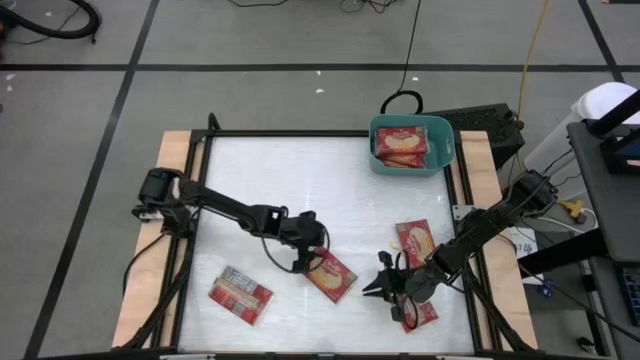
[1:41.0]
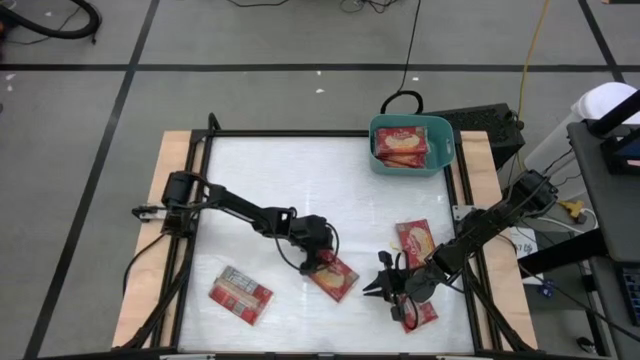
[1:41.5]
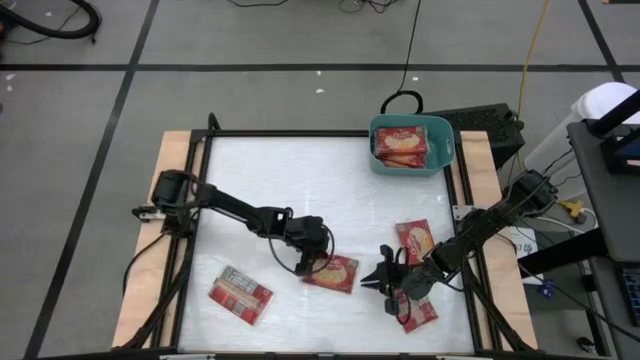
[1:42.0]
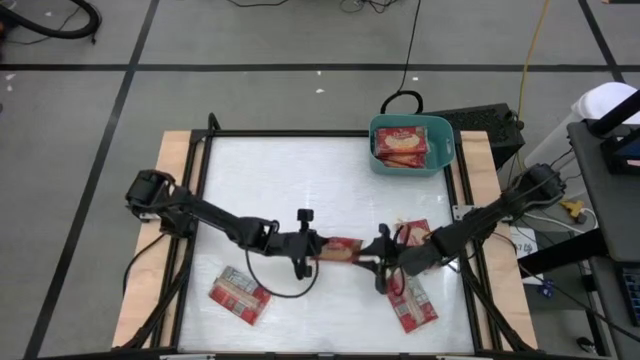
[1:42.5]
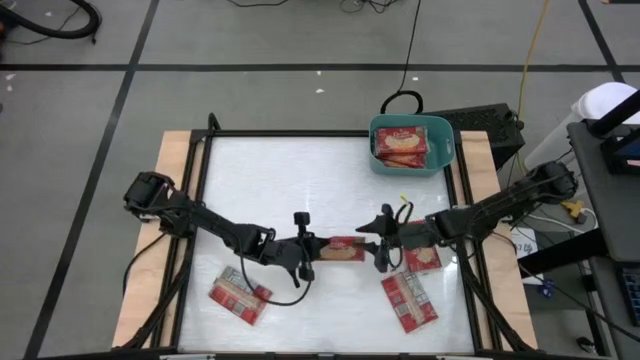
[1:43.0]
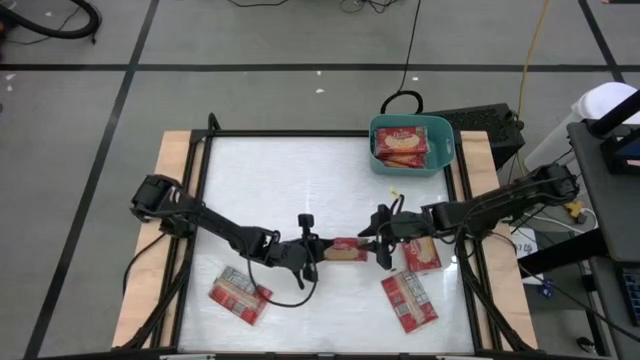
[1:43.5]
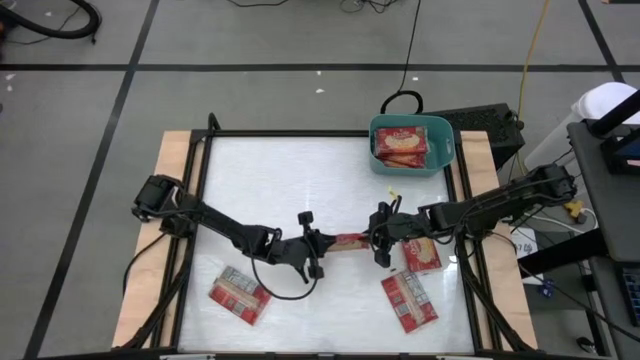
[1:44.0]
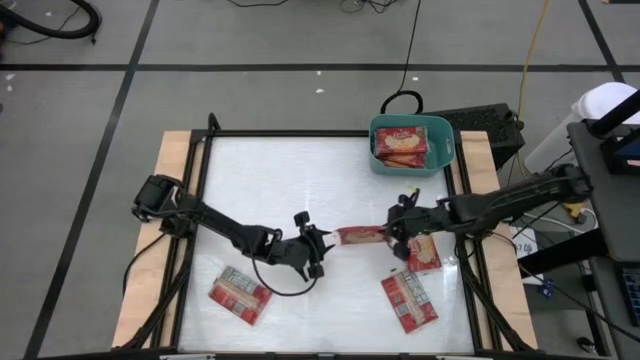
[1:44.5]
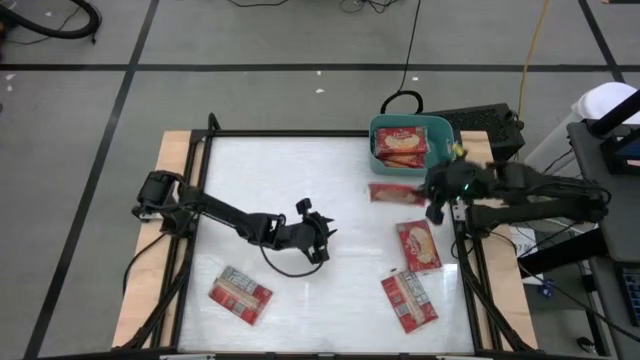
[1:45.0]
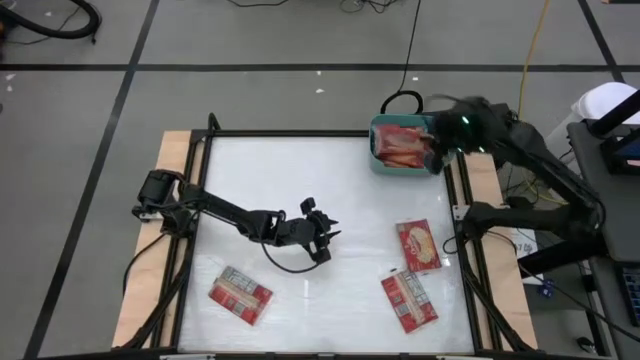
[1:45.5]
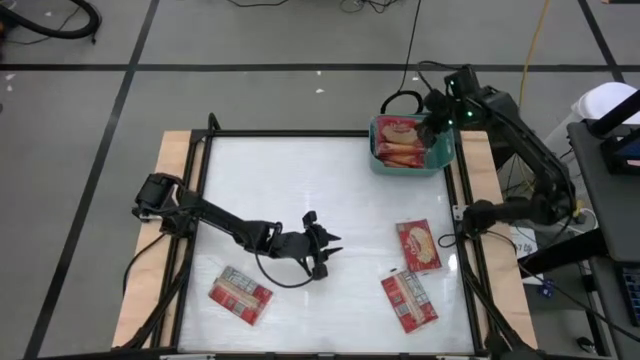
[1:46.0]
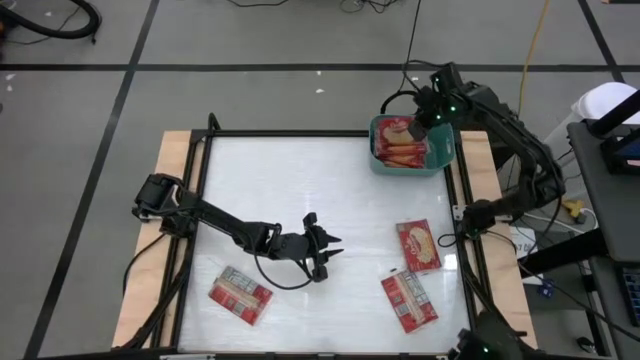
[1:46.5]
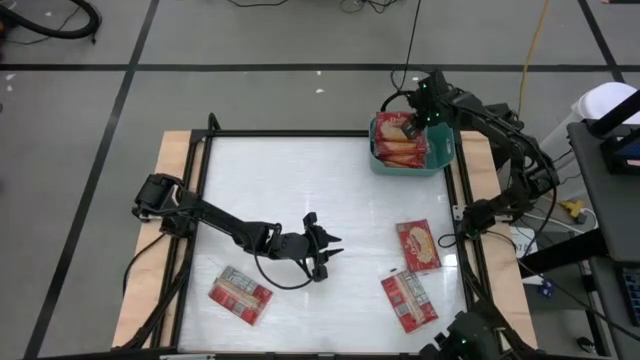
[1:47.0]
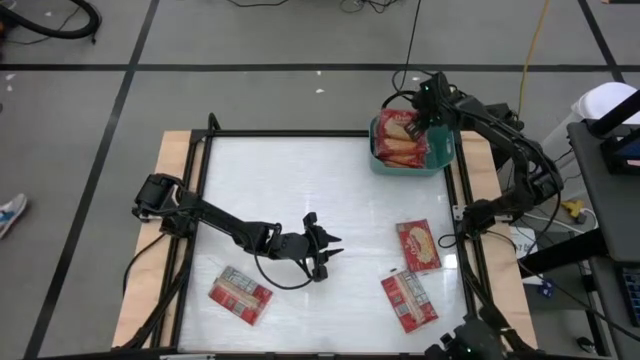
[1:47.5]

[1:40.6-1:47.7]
Task: Sort popcorn bags into baskets
Put the red popcorn bag into the green bin

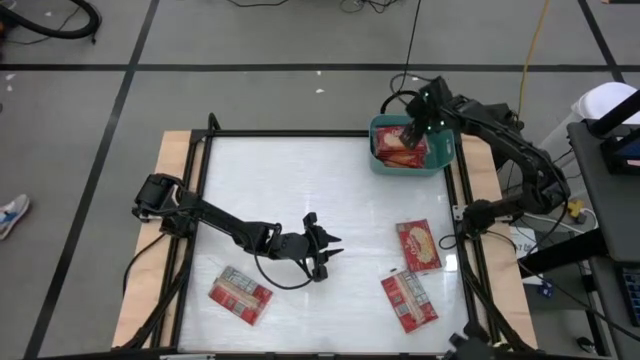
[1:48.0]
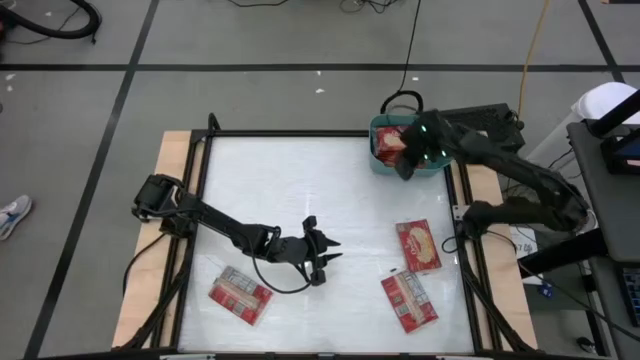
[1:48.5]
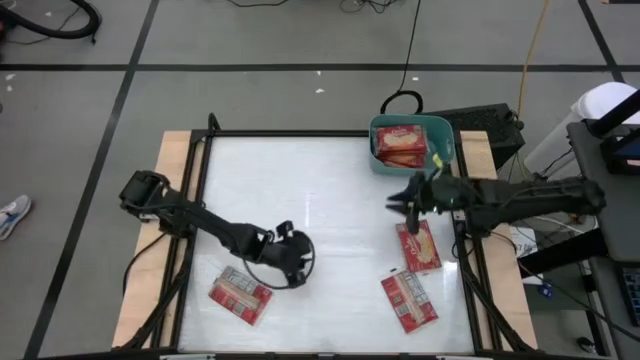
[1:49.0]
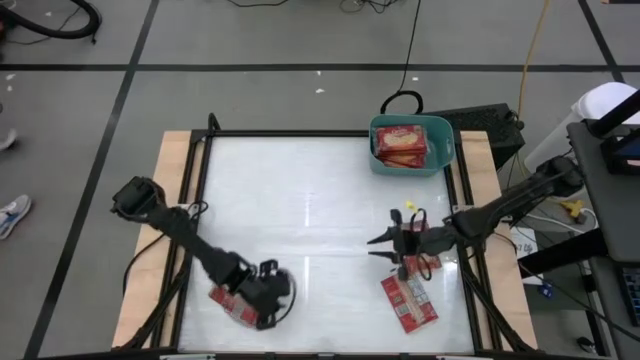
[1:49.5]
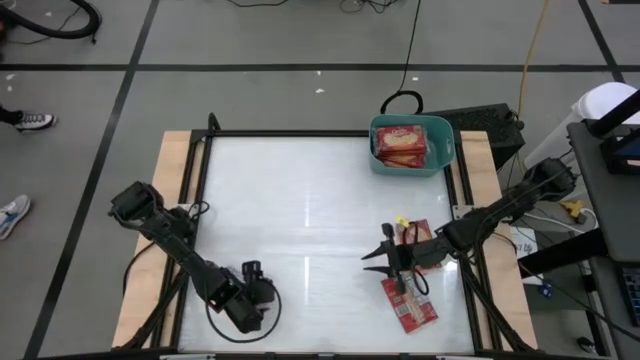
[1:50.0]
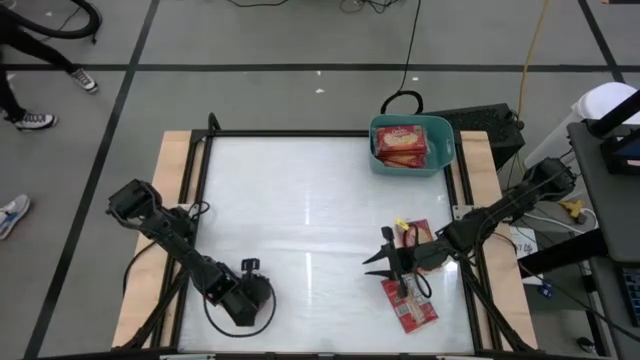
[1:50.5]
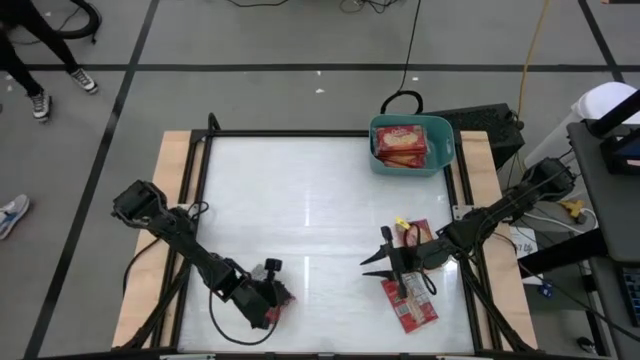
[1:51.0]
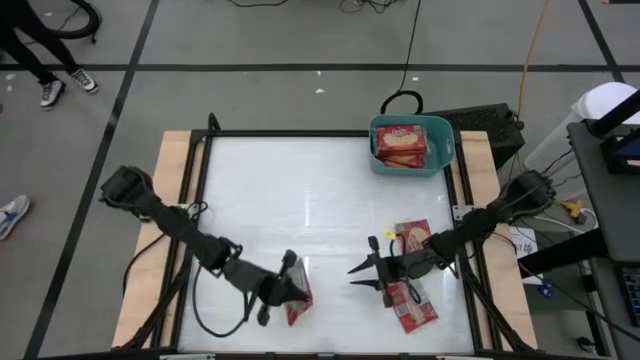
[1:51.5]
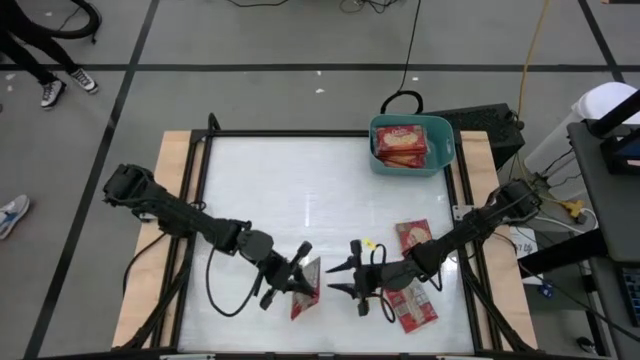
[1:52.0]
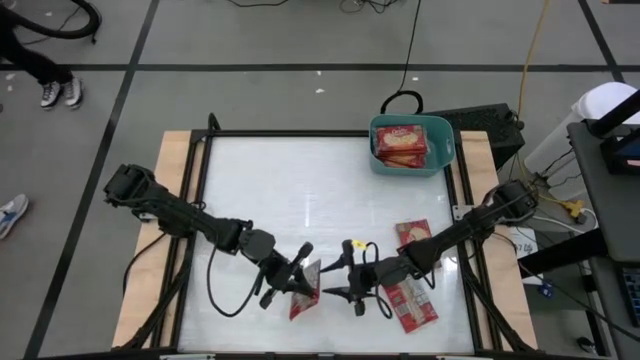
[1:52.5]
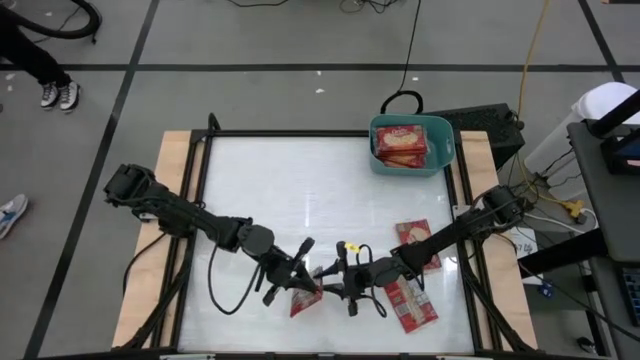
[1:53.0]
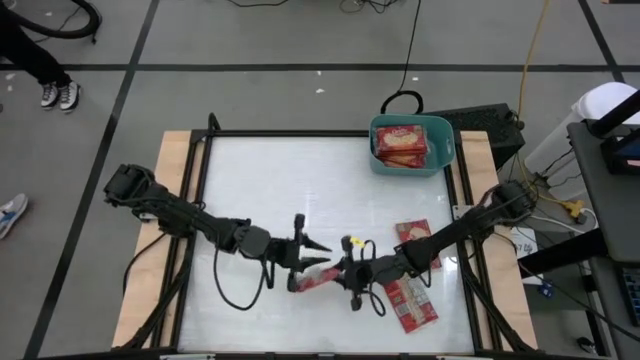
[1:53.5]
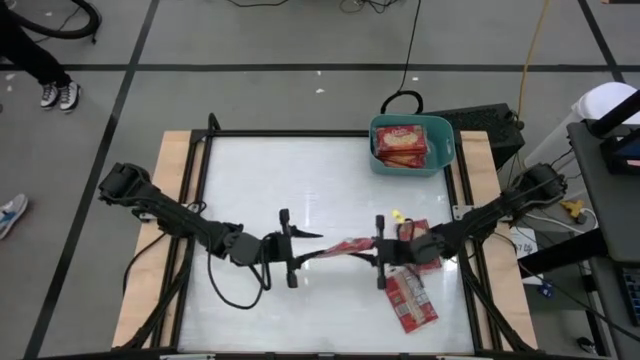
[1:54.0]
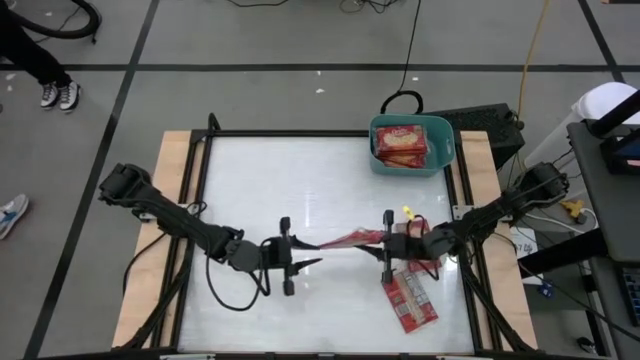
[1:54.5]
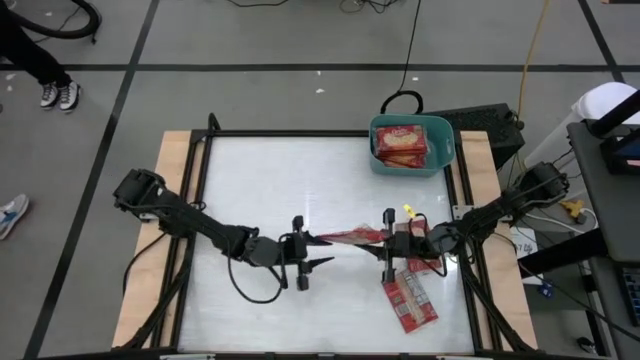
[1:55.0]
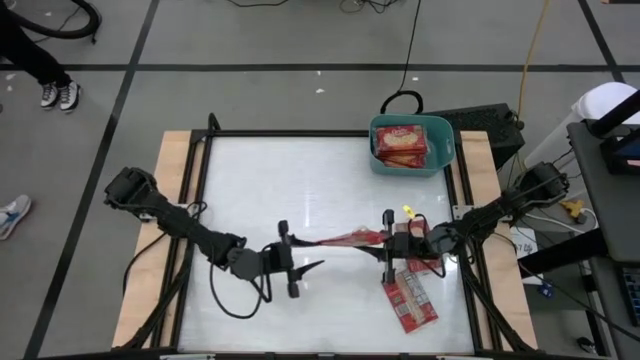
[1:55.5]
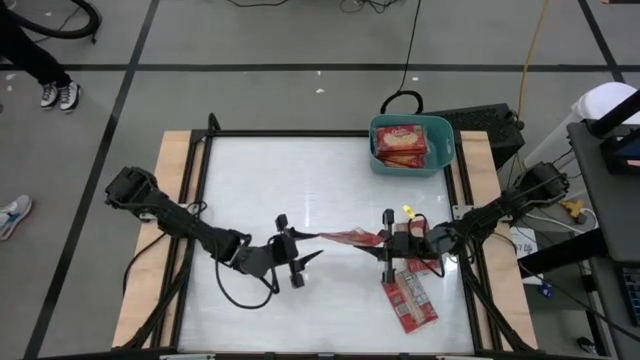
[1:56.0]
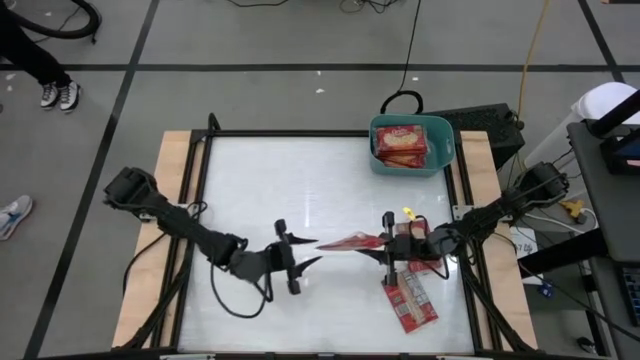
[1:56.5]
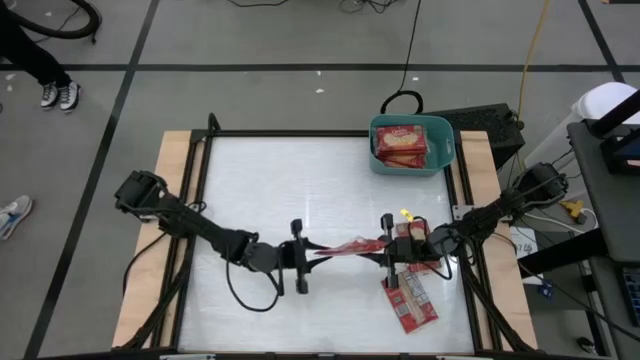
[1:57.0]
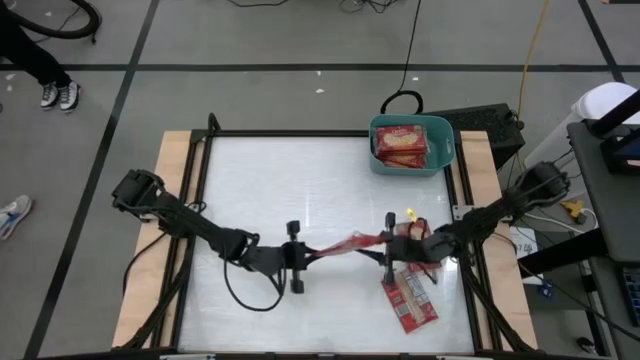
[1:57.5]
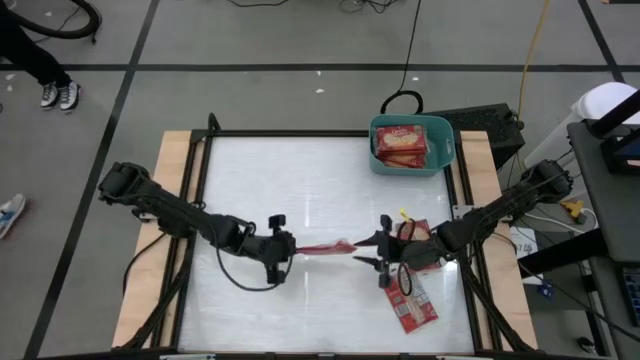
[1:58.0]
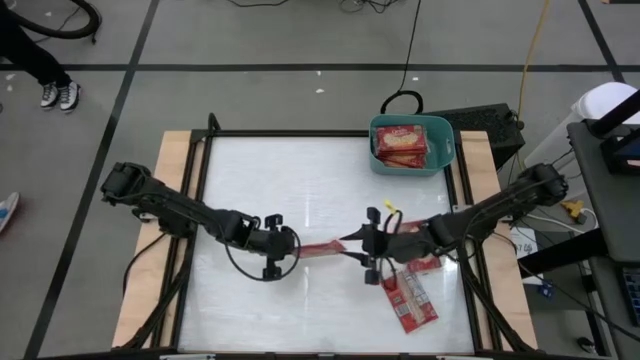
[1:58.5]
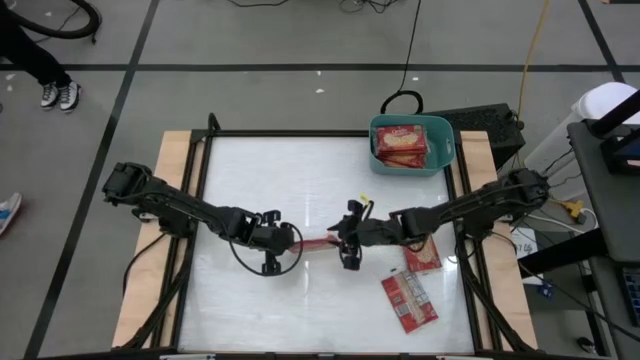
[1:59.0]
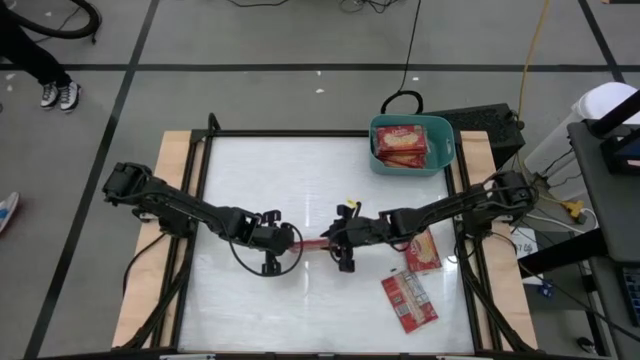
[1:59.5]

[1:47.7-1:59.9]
Put the red popcorn bag into the green bin
